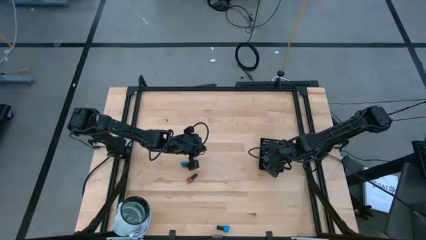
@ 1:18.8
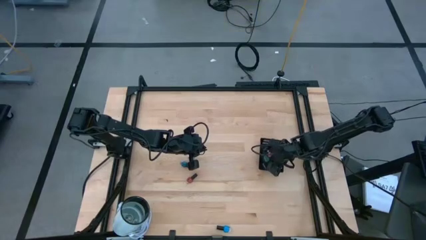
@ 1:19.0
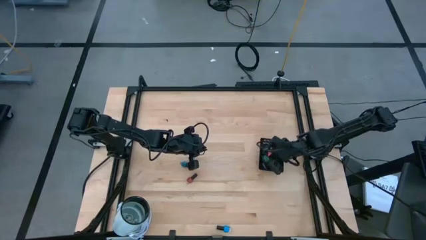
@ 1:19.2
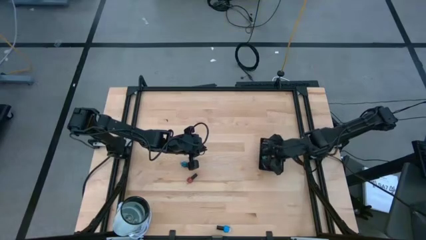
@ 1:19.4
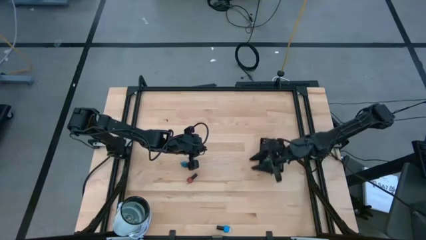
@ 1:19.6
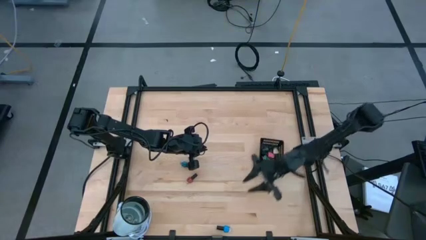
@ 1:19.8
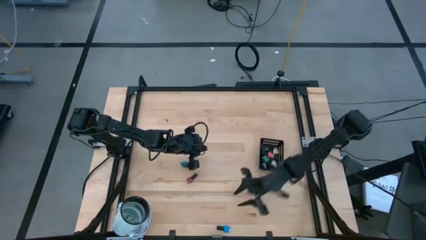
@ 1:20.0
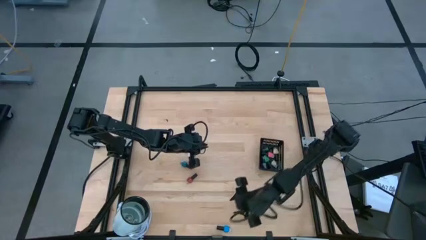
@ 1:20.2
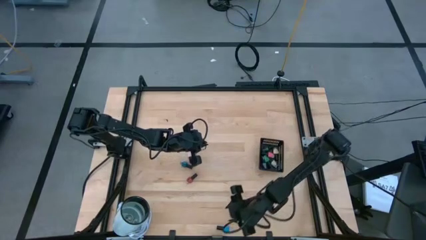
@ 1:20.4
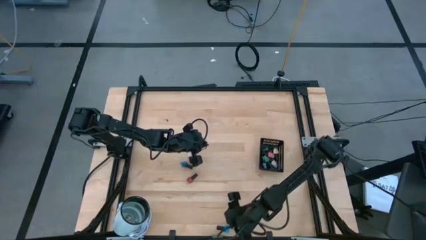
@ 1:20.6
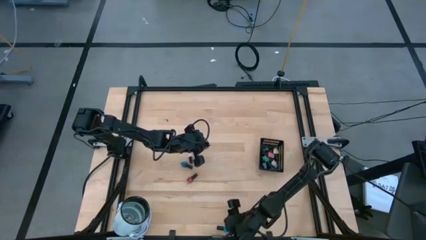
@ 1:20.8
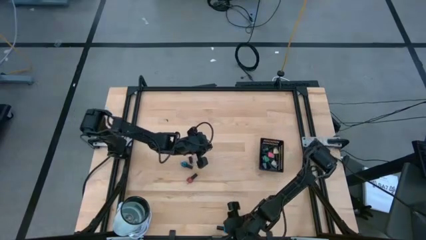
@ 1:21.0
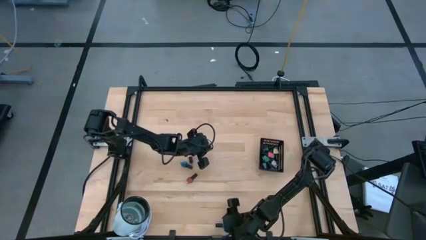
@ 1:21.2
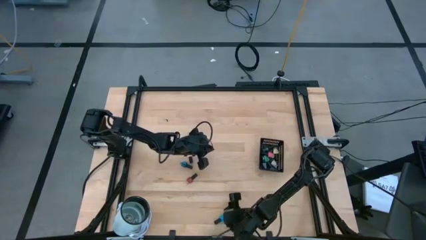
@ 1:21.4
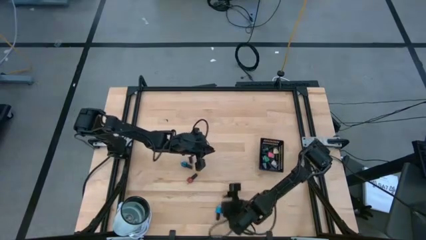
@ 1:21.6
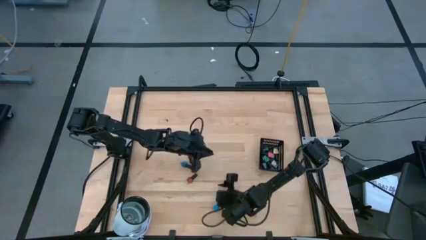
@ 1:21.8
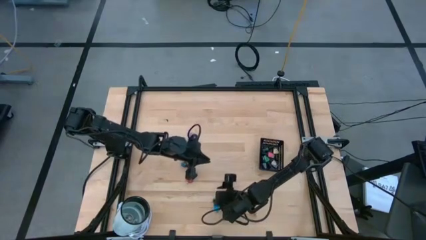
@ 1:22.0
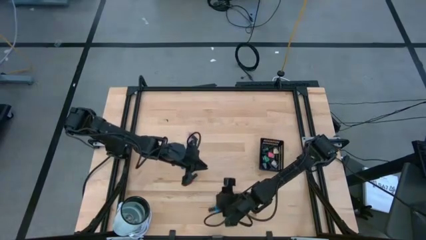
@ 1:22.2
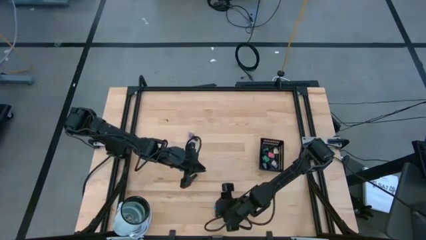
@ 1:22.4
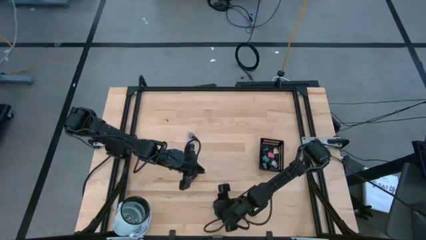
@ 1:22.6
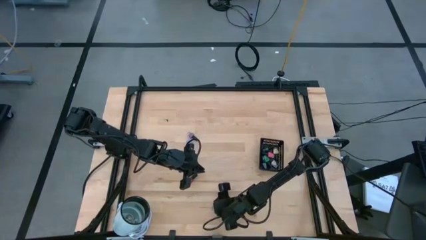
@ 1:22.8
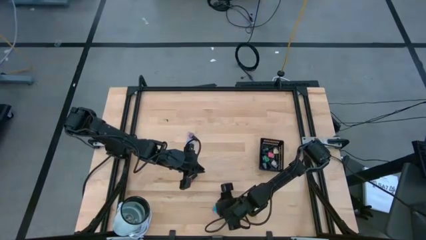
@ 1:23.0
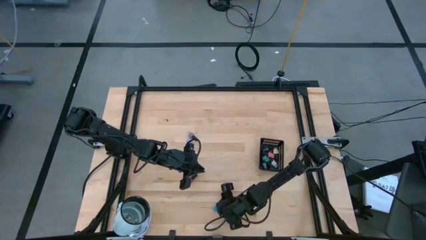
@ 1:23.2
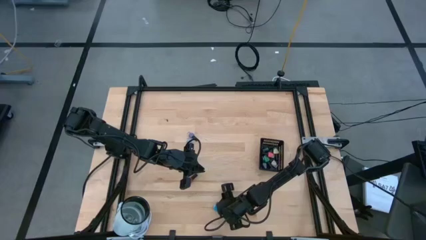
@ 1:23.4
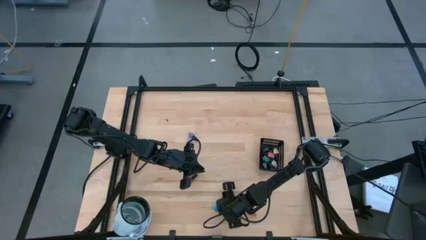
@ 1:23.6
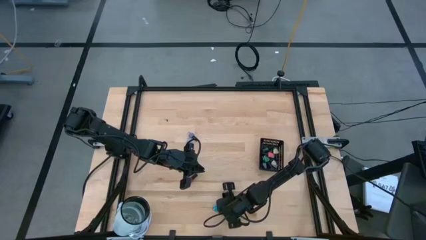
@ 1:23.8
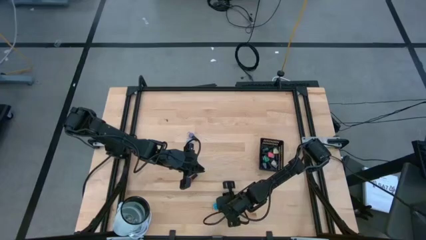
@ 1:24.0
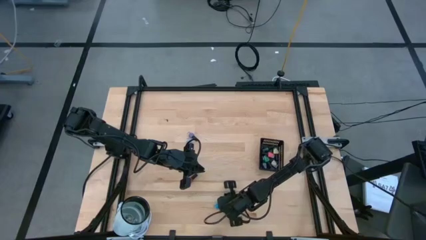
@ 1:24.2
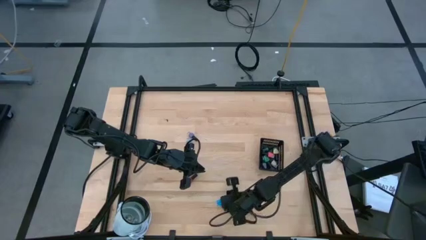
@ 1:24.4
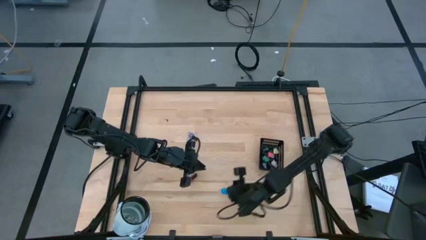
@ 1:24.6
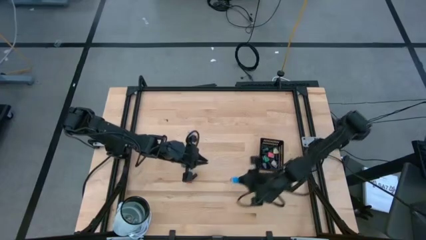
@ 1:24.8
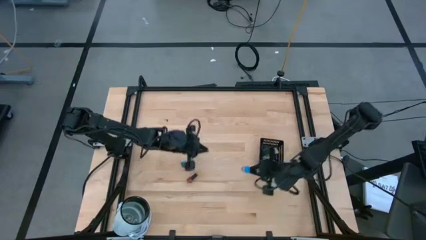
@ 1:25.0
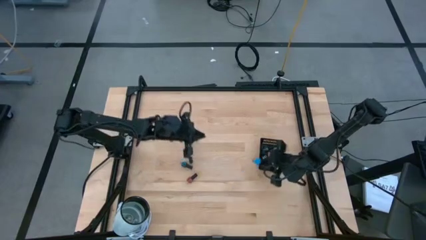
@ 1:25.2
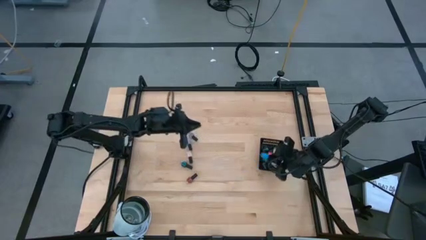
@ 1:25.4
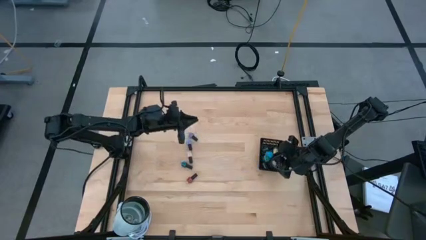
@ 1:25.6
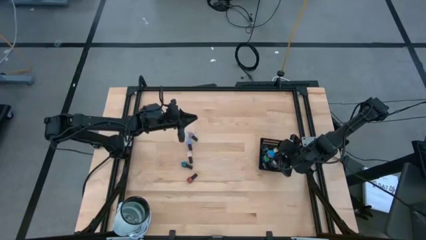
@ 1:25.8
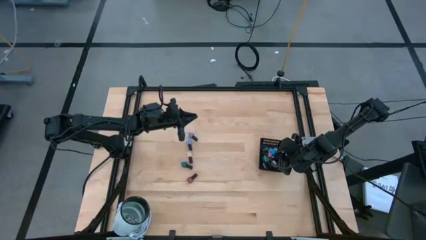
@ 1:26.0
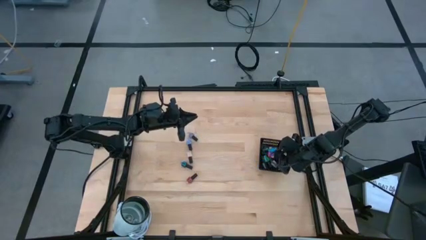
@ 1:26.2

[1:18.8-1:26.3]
Task: Pick & Place Nail Polish
Put the blue nail polish into the black basket
